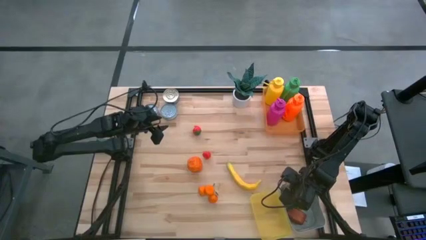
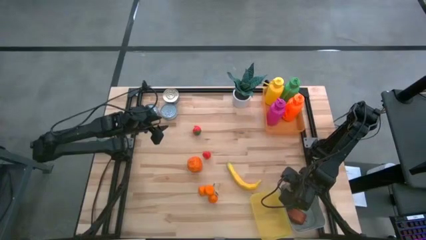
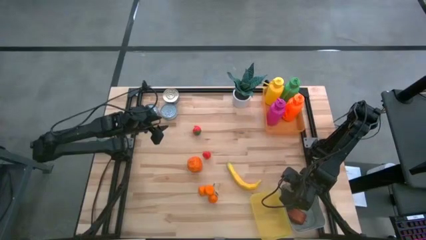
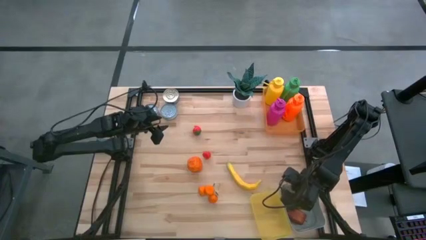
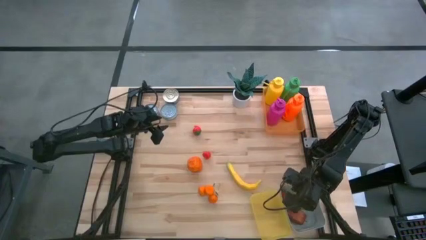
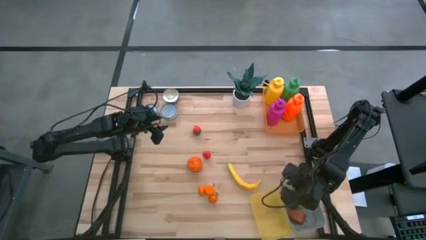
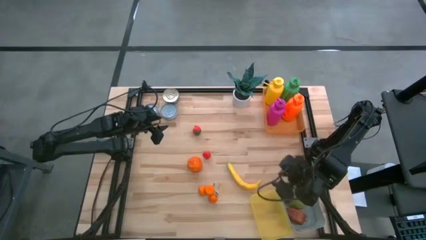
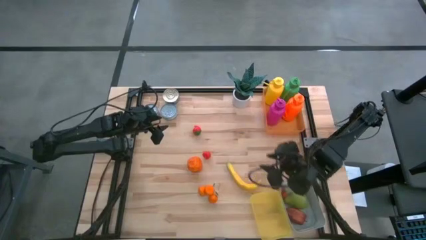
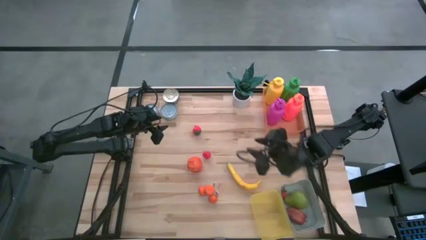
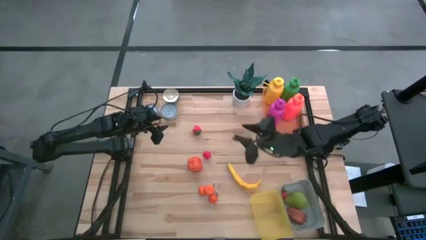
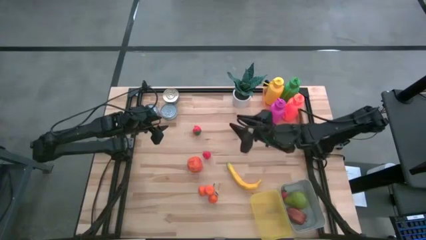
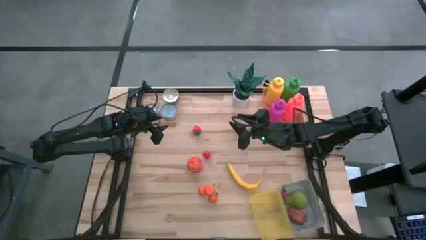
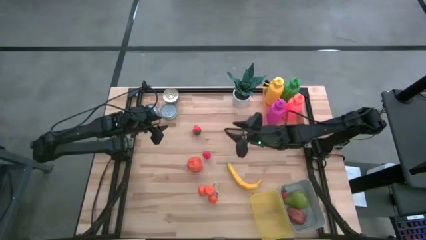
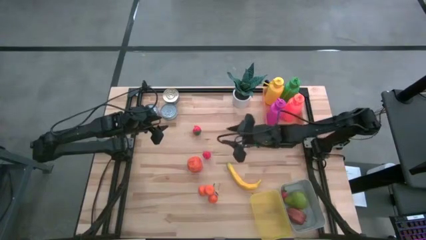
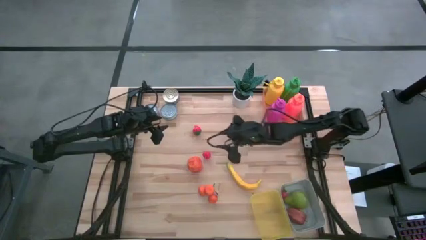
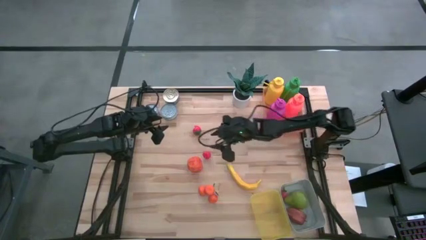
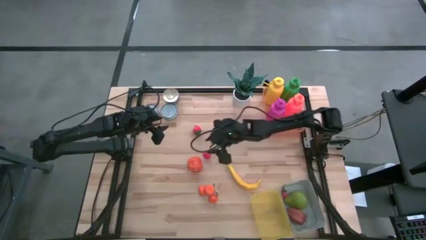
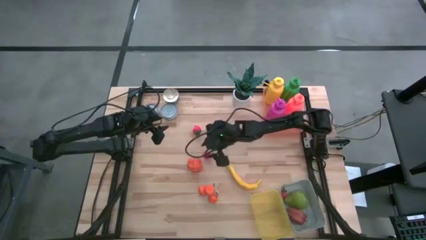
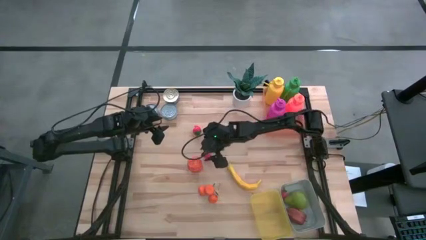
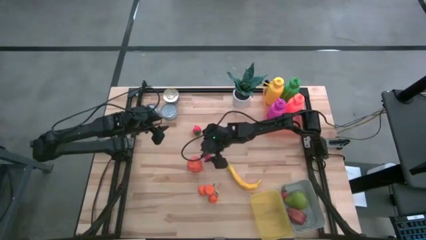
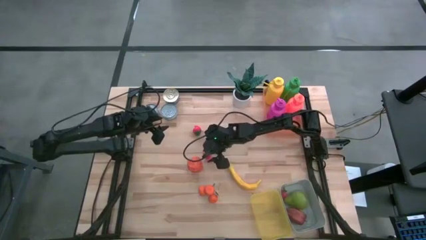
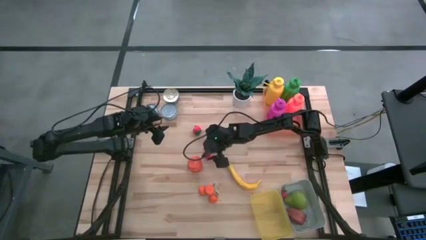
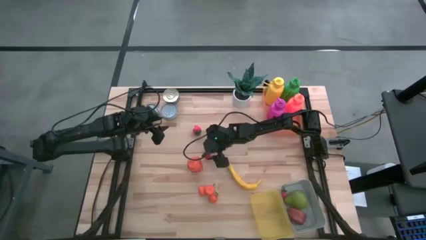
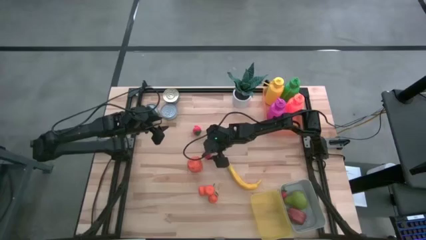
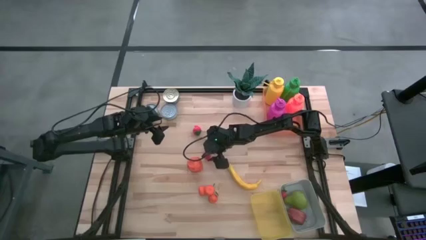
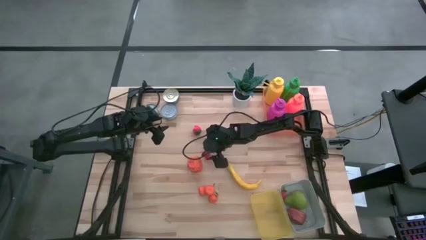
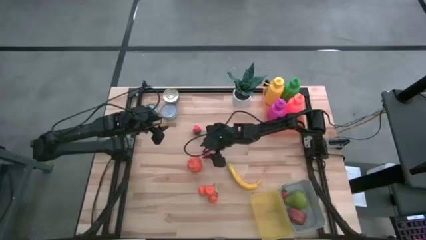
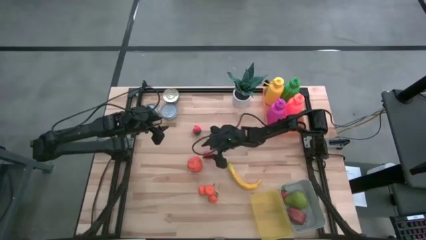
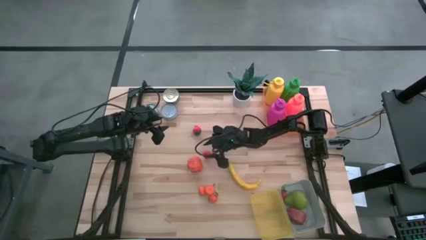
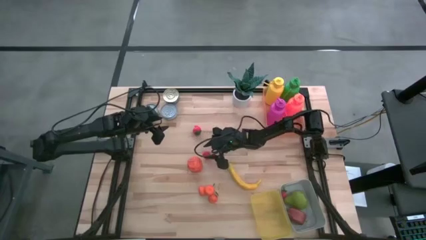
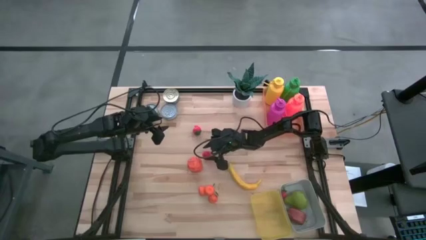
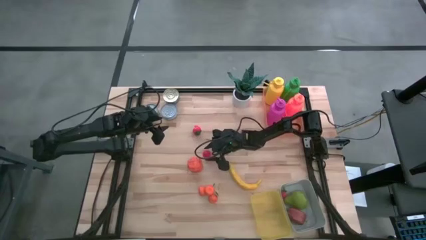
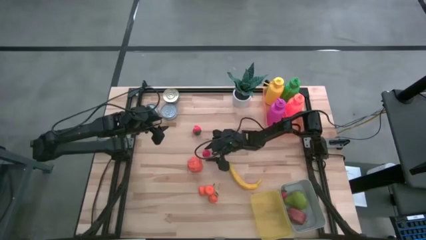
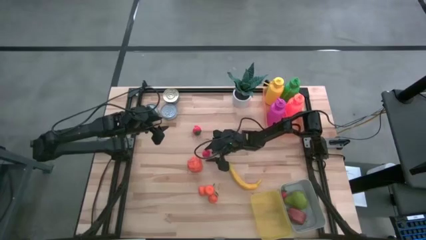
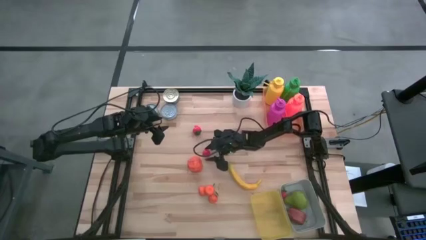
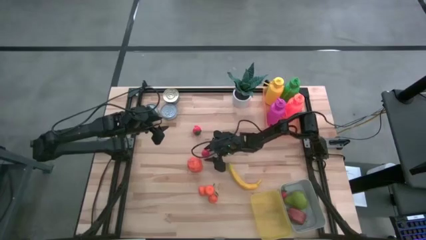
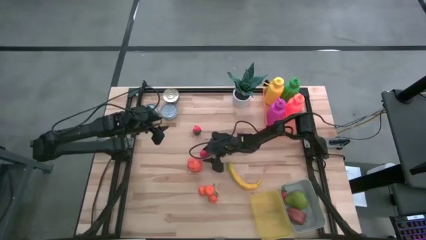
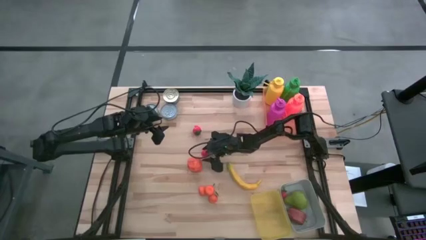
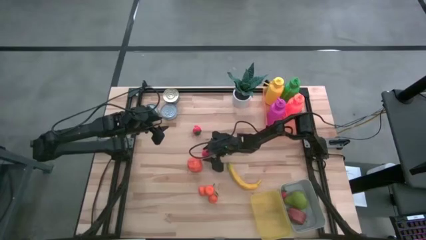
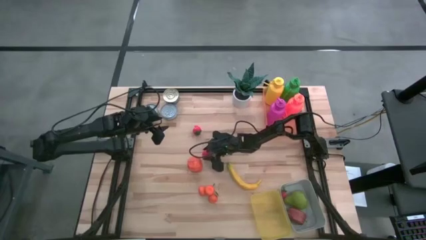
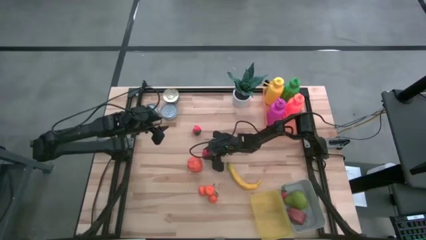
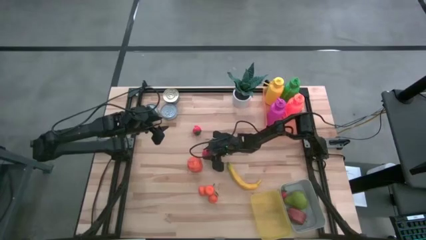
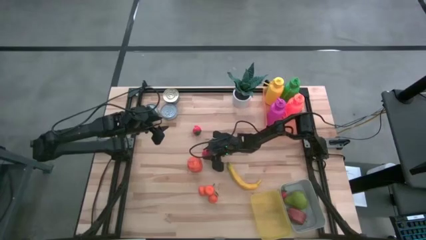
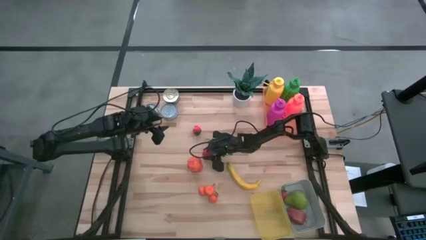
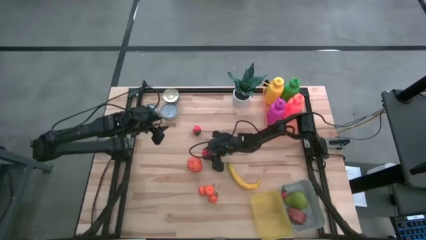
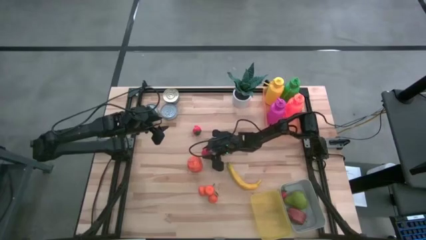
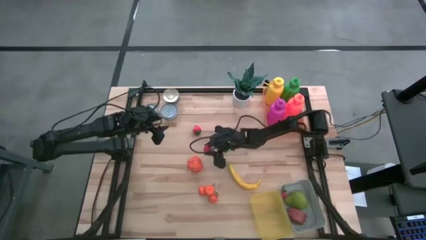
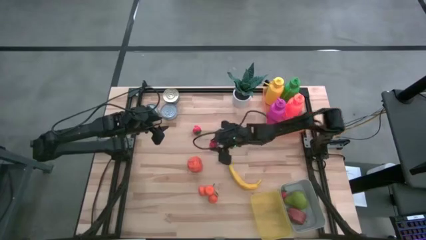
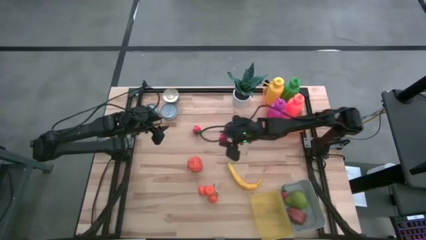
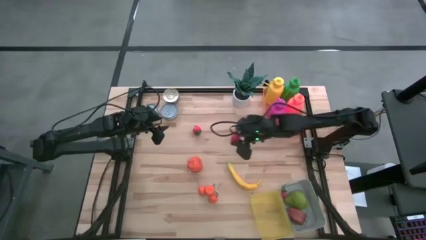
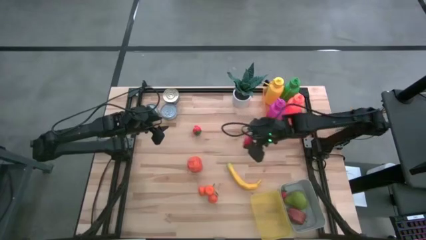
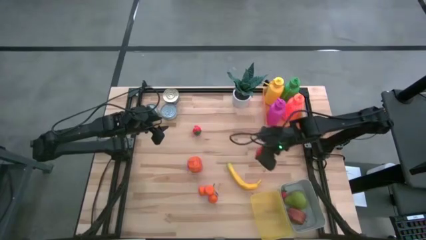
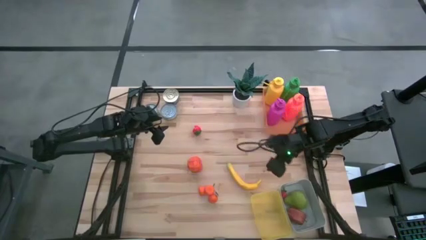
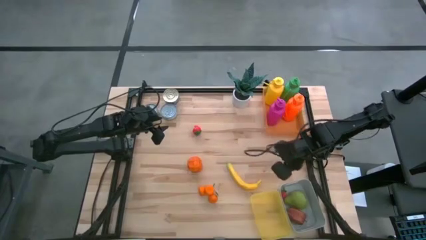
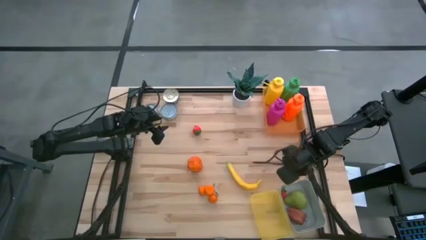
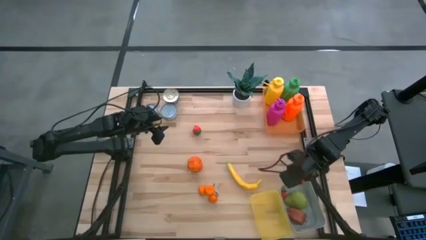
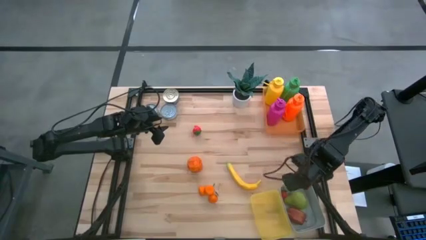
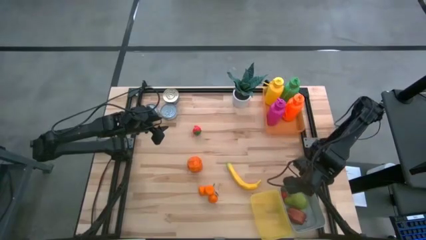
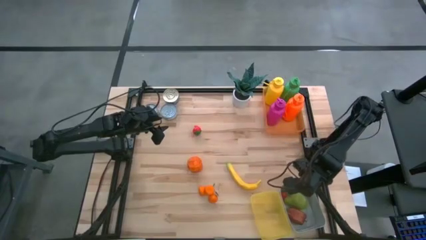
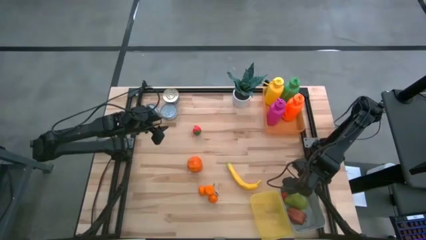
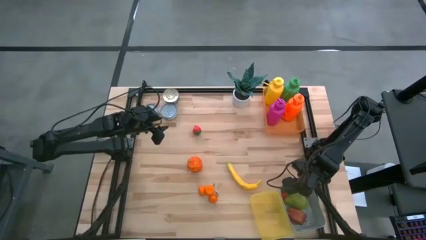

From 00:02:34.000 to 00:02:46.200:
Task: Pick & Place Food Item
Put the red cherry into the gray bin
